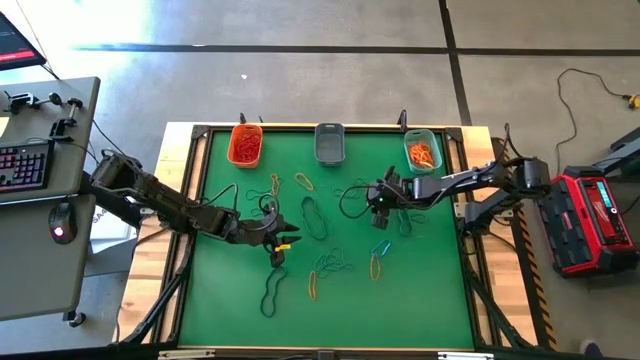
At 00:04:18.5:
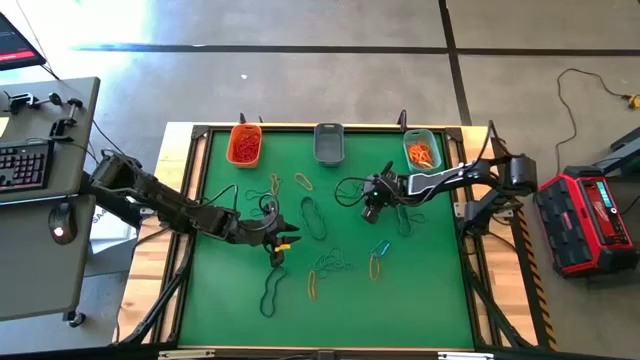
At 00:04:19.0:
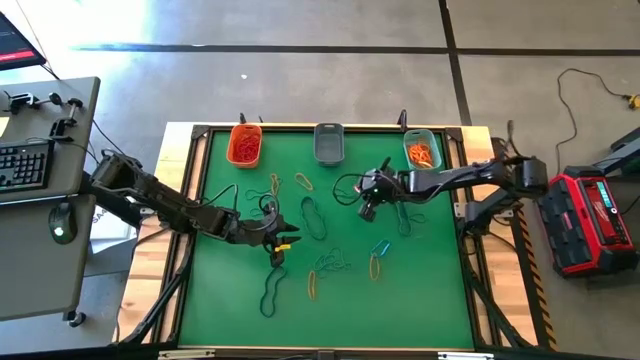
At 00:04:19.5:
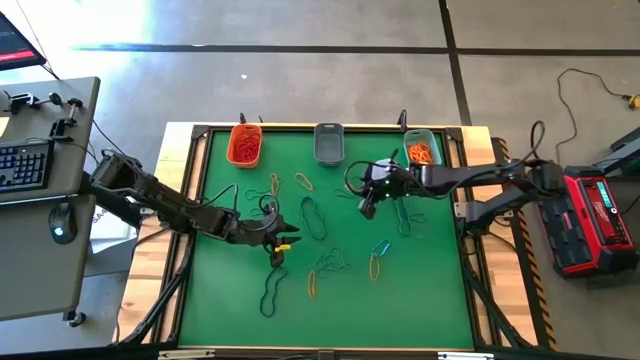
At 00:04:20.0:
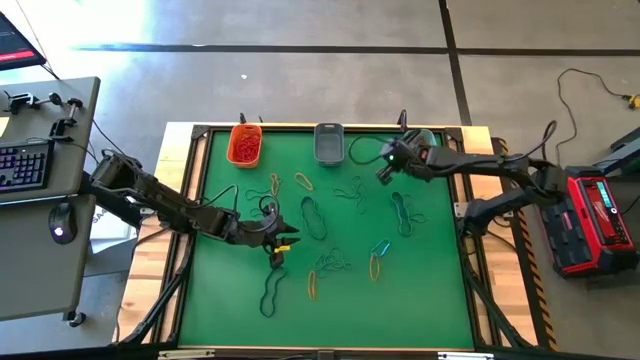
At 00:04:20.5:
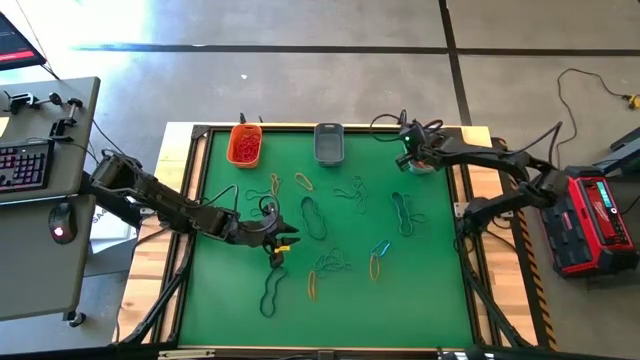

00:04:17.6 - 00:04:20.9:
Task: Sort rubber bands into baskets
Put the orange rubber band into the green bin

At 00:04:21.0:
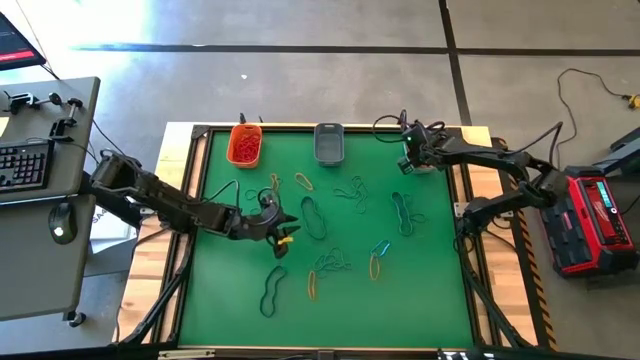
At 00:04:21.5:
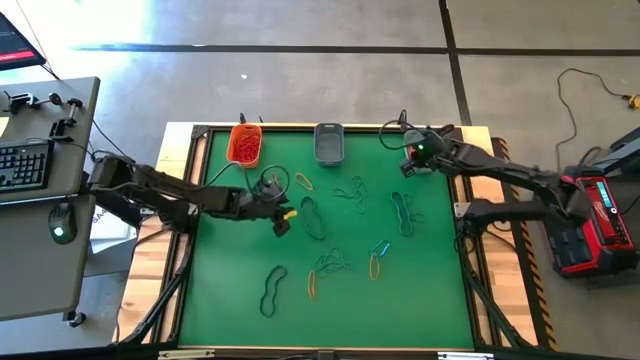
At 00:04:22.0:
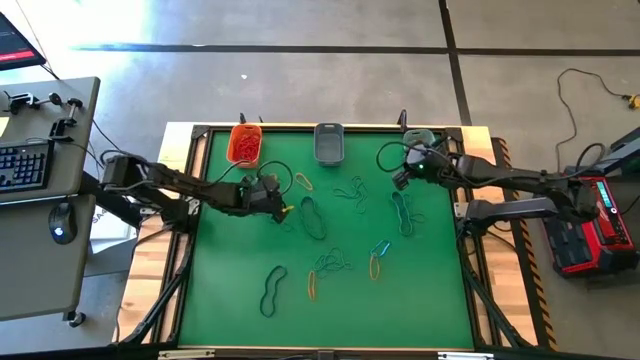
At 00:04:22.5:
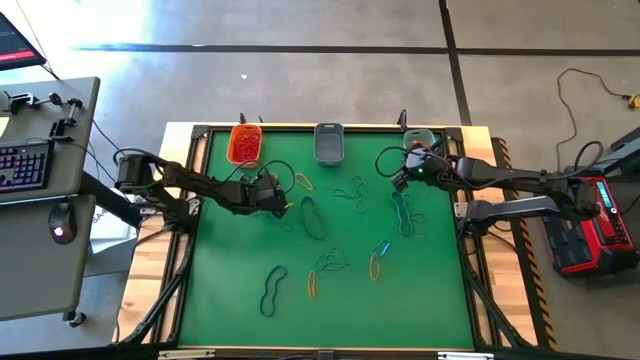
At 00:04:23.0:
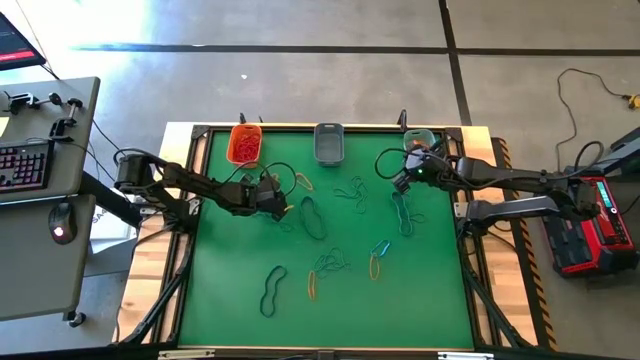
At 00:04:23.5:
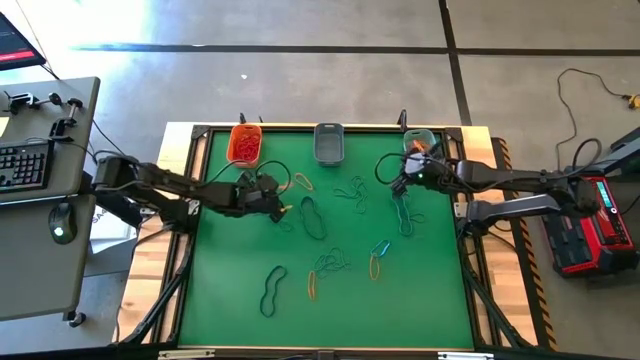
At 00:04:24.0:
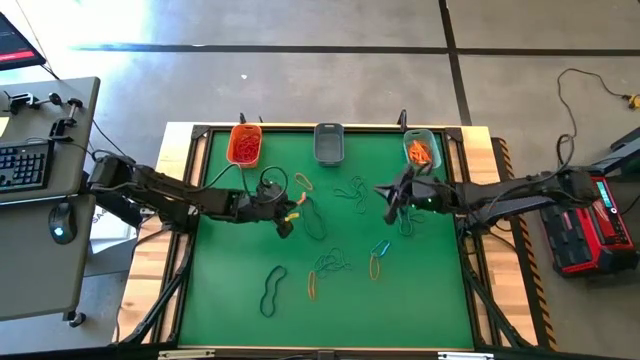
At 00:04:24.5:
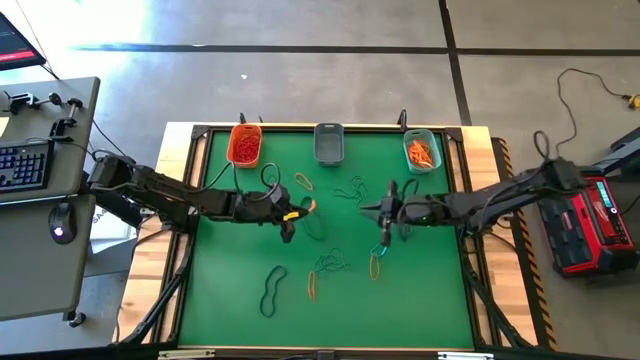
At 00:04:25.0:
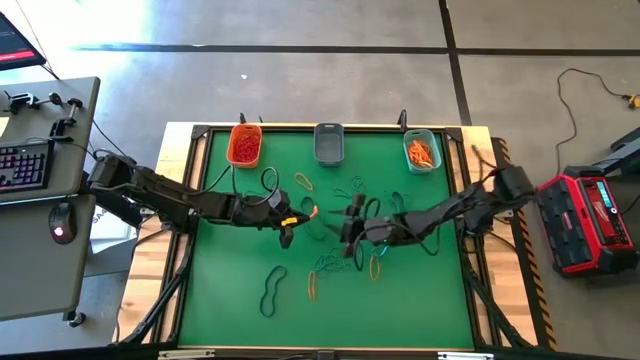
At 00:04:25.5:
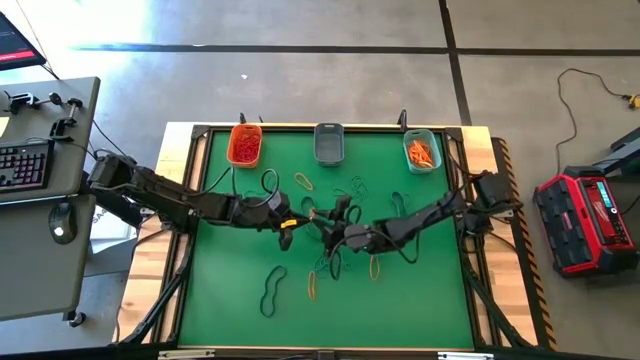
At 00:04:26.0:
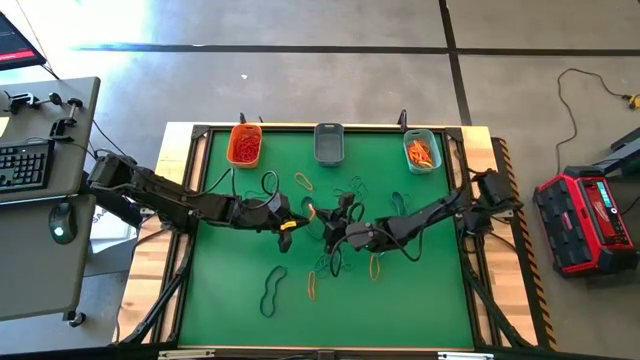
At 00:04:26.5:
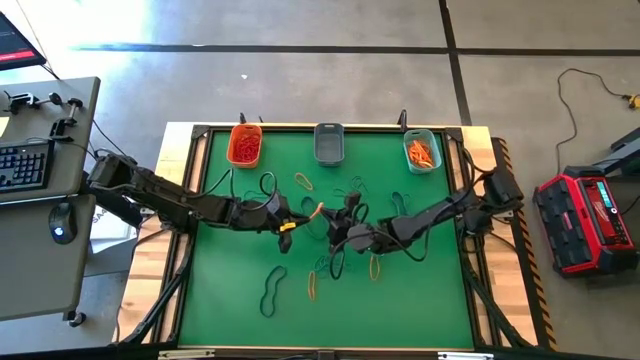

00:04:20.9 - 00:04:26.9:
Put the orange rubber band into the green bin

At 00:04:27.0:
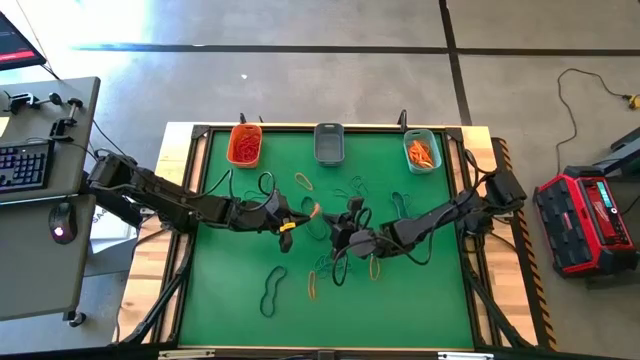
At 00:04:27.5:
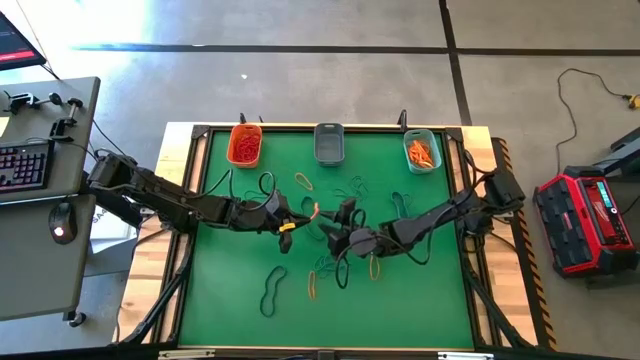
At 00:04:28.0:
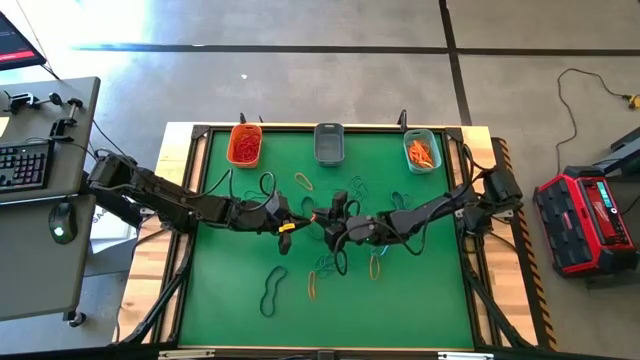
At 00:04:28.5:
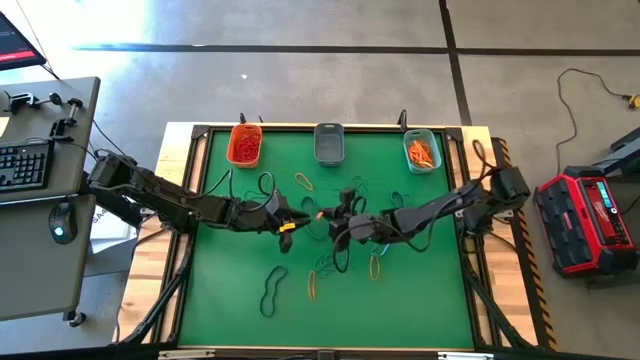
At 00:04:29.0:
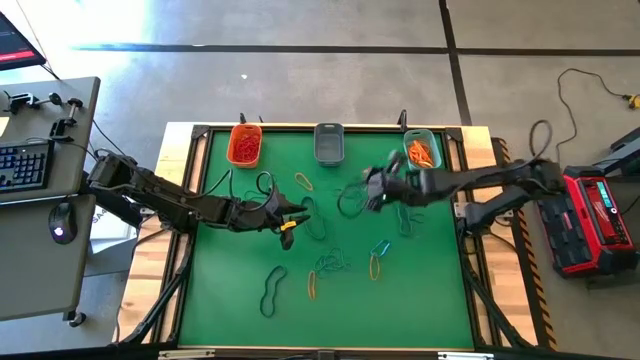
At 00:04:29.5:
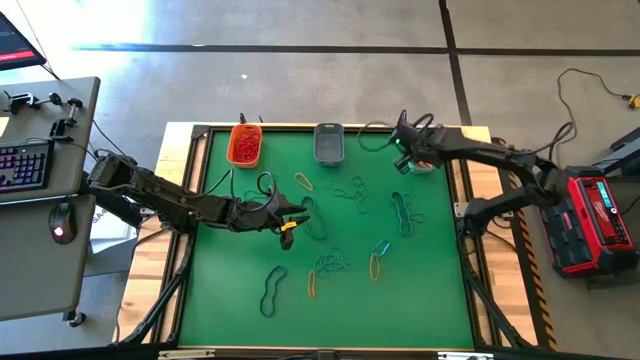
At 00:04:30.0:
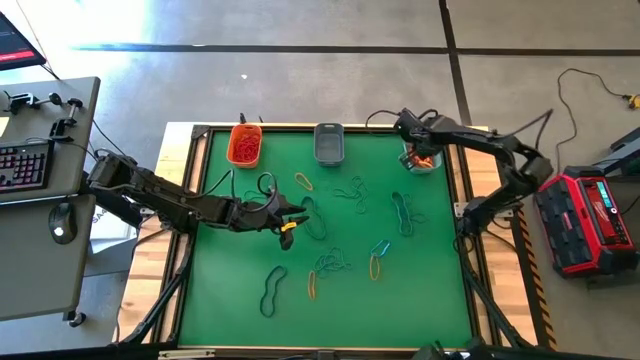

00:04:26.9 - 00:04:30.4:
Put the orange rubber band into the green bin

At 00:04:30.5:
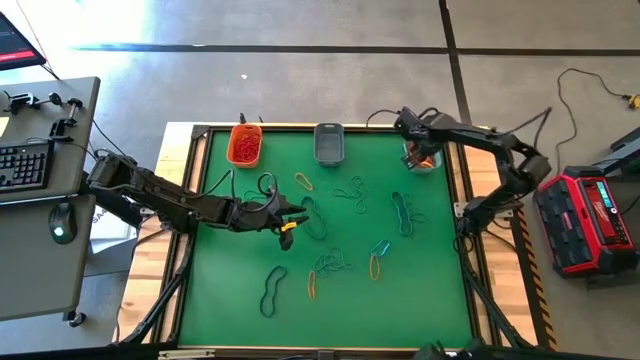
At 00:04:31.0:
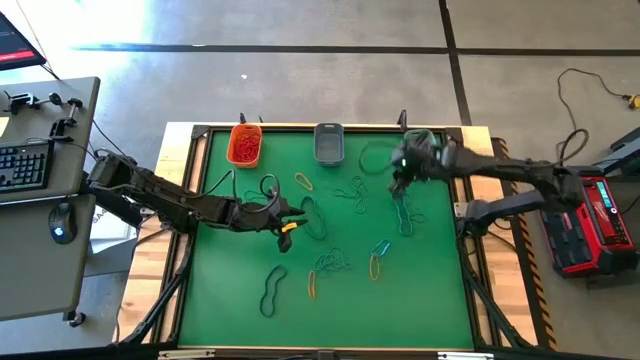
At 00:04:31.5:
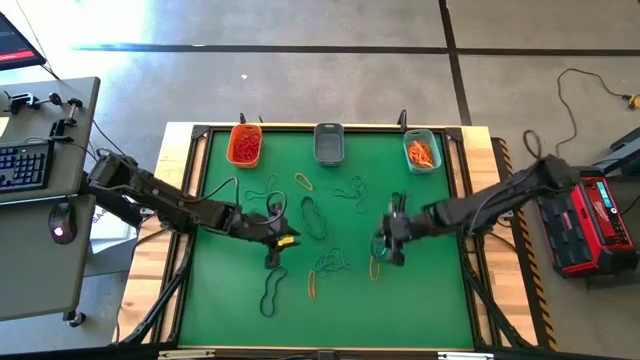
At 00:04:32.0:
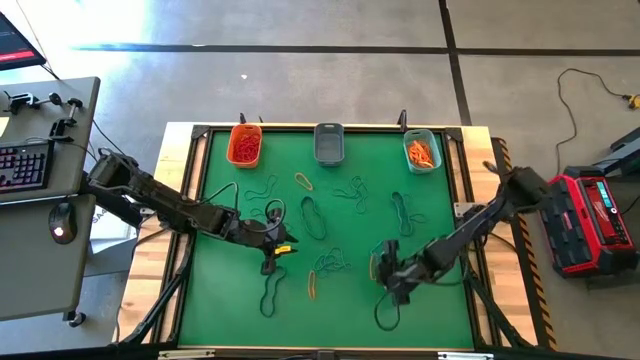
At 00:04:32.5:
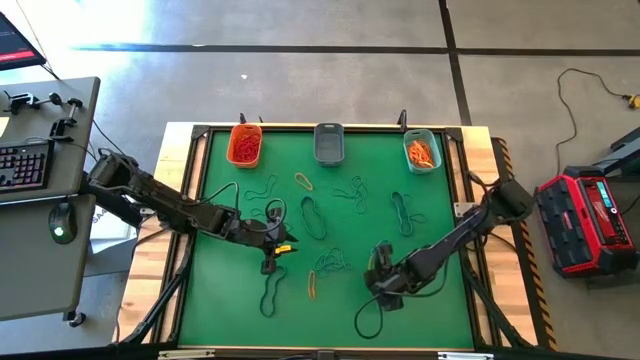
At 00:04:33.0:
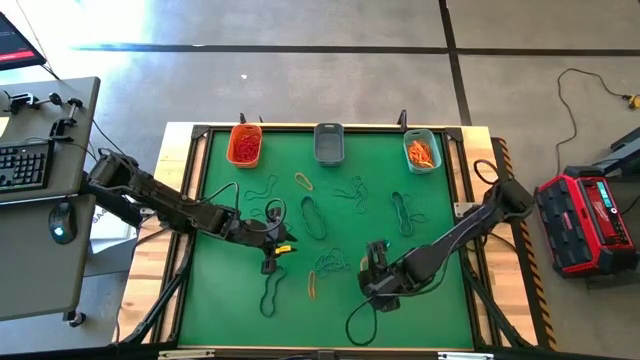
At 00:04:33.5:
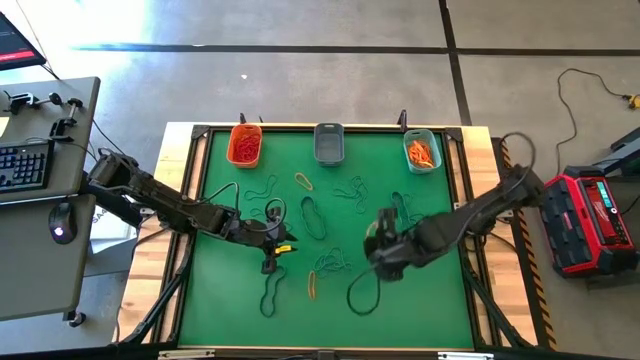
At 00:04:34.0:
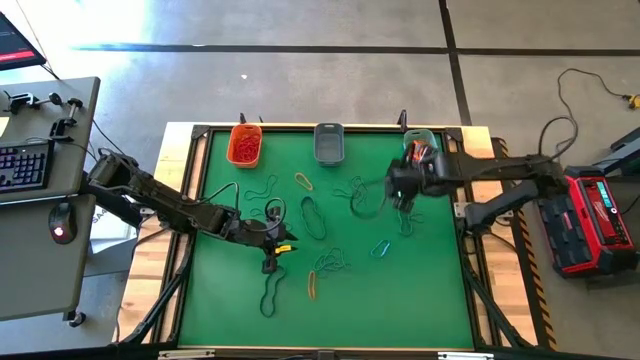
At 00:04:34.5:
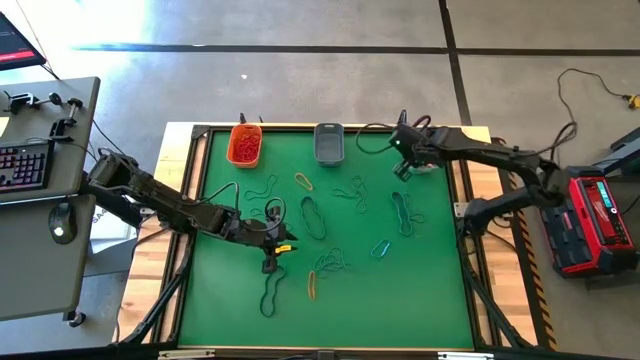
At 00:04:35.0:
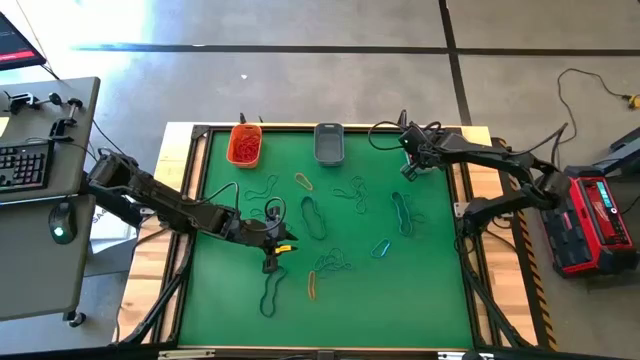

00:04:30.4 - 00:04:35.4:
Put the orange rubber band into the green bin

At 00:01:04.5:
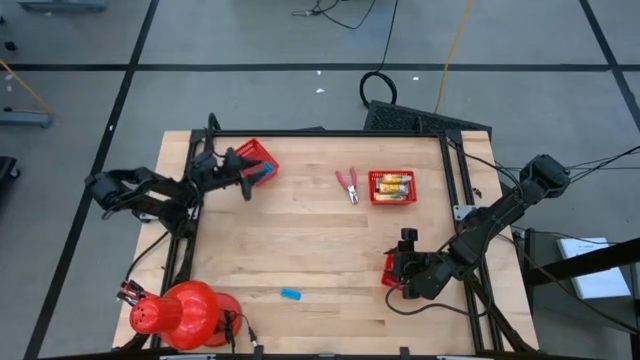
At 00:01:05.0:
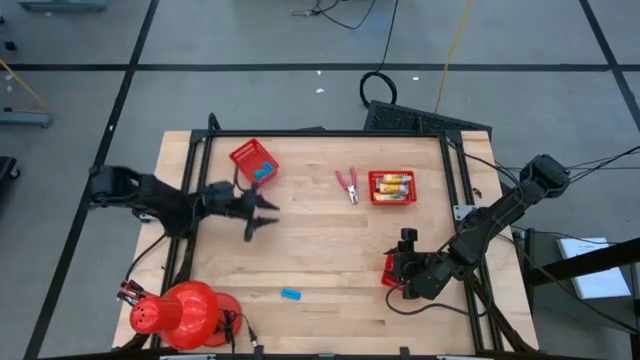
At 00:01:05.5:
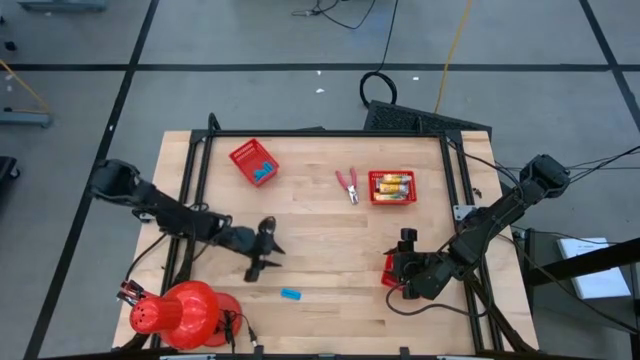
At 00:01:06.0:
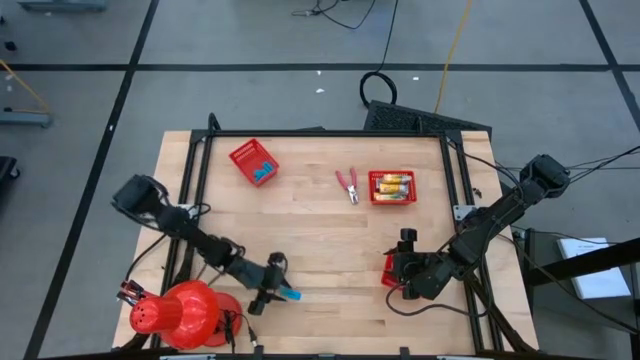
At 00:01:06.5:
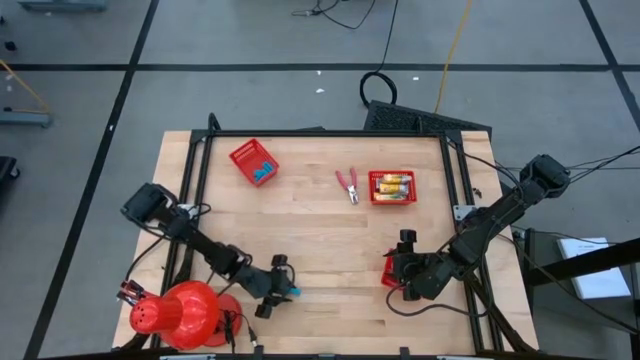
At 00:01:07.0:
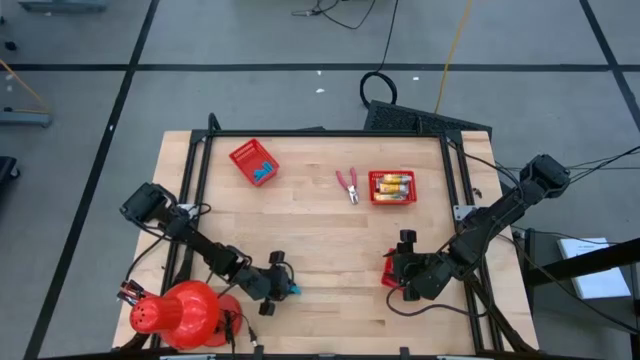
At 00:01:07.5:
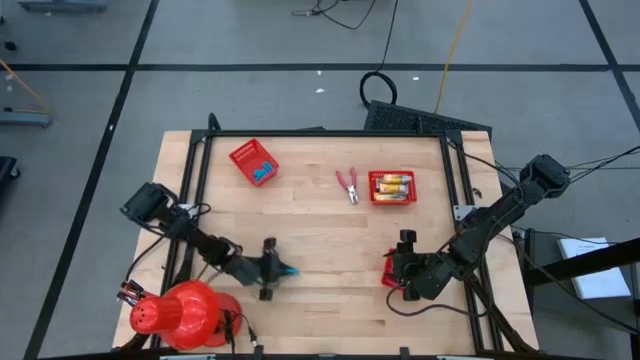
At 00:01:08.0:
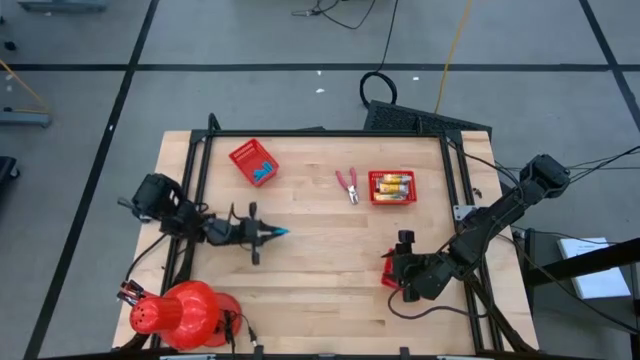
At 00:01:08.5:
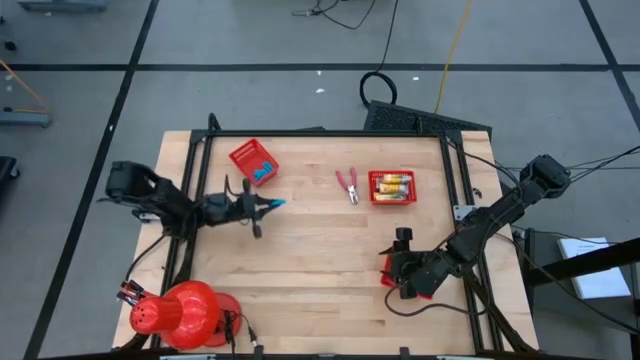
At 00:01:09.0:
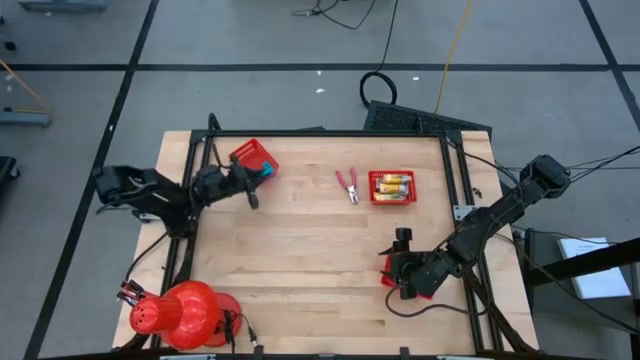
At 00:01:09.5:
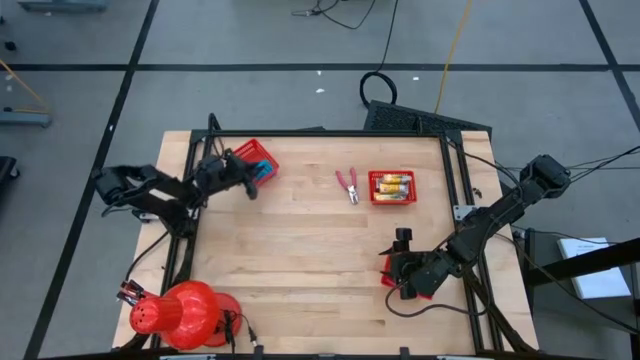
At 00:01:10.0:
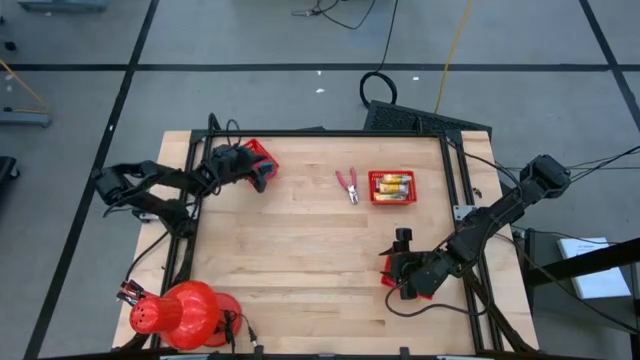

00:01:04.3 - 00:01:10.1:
Task: Pick & Place School Supplies
Put the blue eraser into the top left red bin
